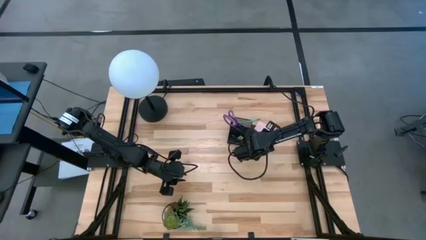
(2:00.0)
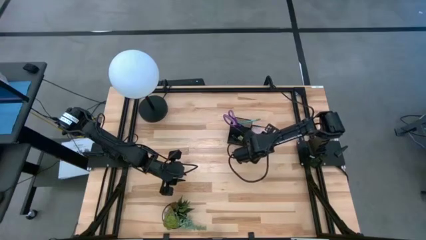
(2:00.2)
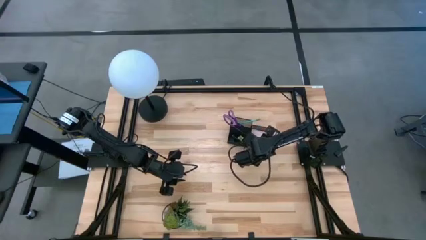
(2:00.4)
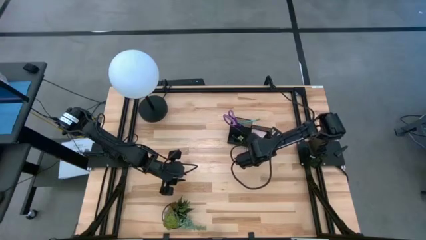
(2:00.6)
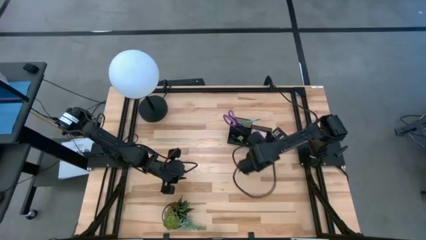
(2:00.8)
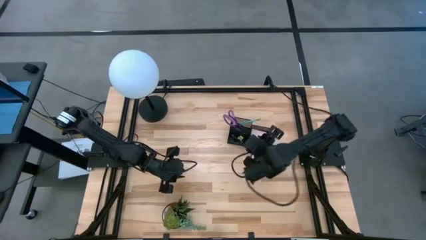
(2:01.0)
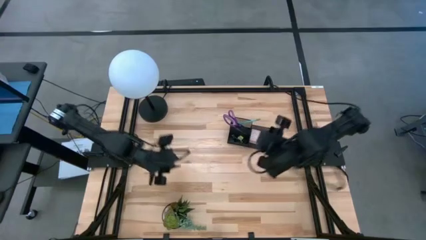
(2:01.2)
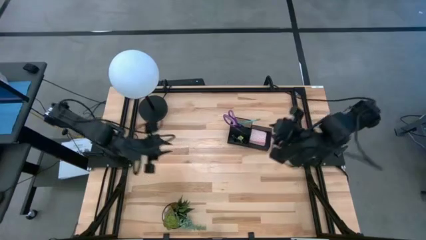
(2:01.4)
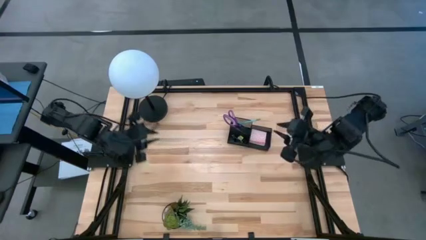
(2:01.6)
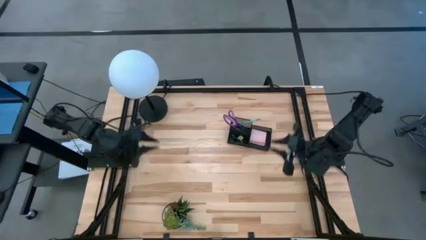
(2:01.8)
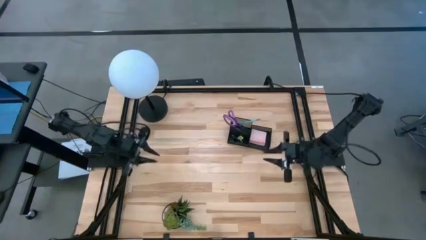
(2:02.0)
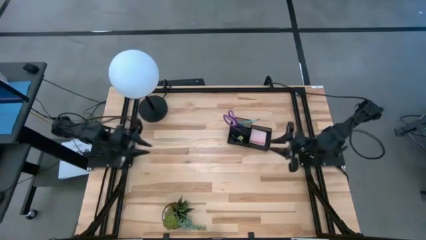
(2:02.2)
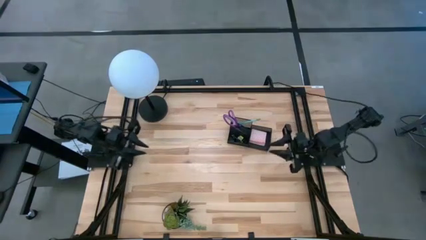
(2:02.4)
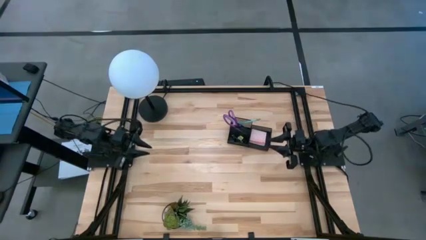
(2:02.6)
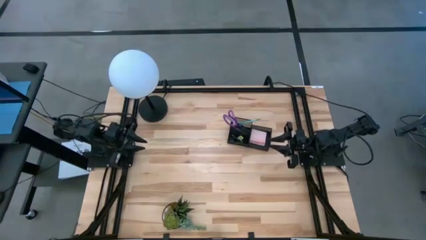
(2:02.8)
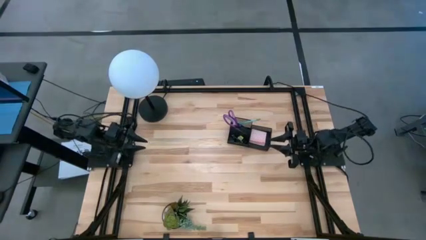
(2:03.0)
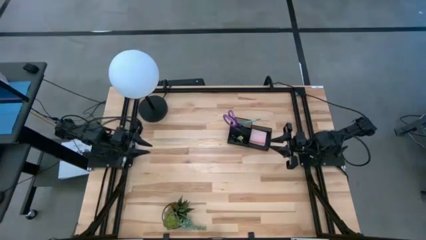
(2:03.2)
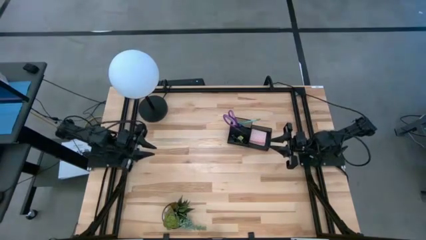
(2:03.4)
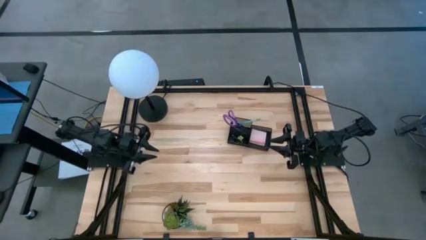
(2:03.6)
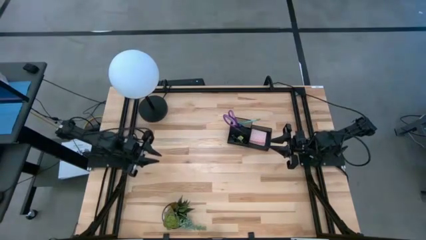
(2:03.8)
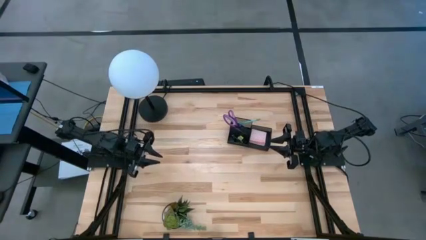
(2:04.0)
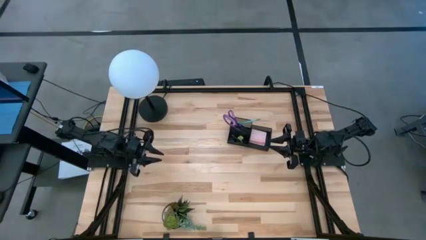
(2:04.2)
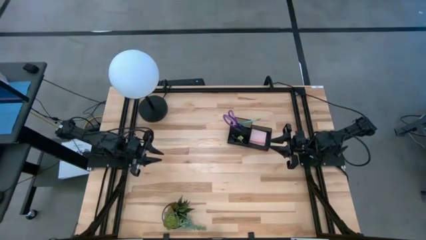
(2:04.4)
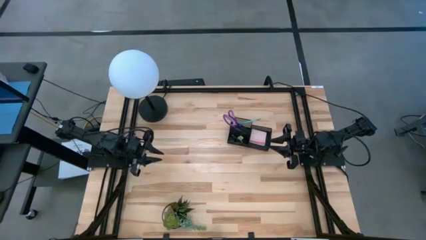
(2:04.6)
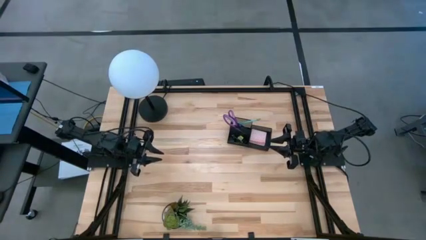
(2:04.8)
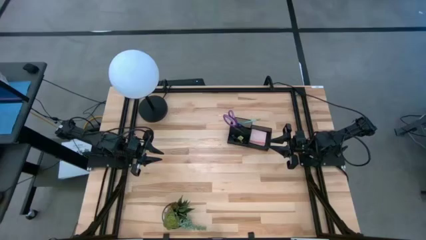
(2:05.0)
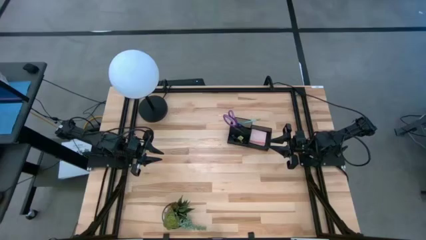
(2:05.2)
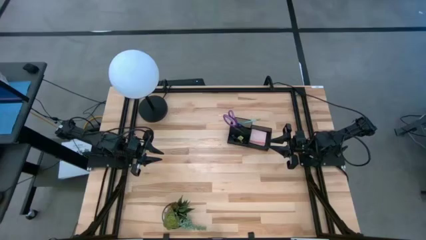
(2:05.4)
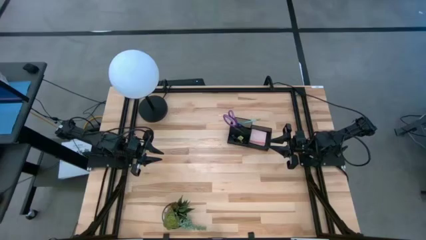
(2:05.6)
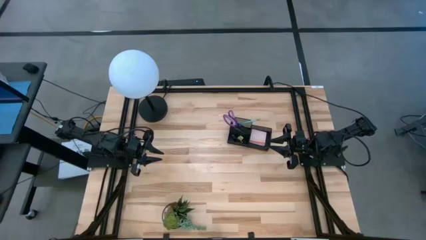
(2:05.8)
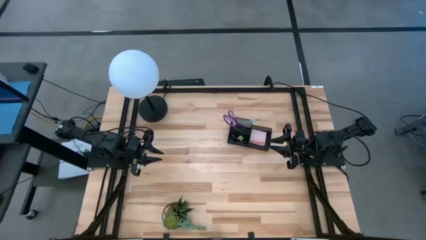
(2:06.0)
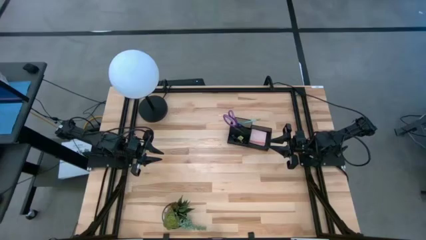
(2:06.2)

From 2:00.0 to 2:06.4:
Task: Pick and place office supplies into organizer
Return to Home Position

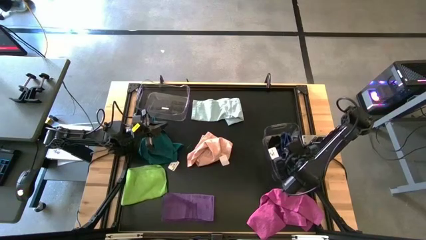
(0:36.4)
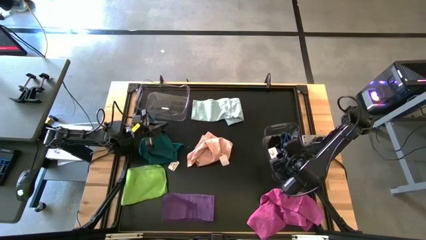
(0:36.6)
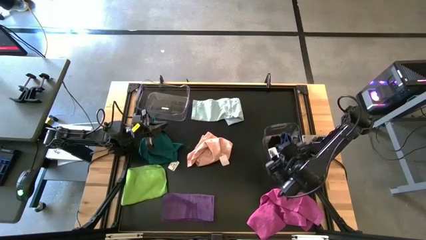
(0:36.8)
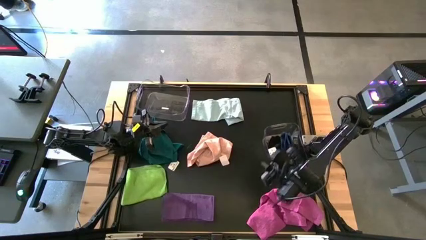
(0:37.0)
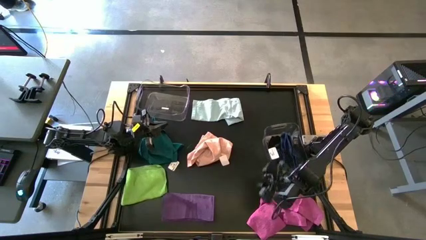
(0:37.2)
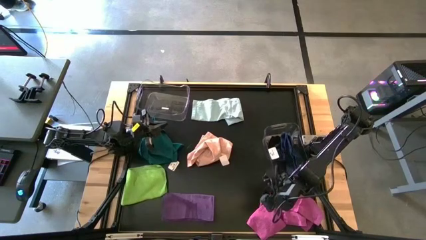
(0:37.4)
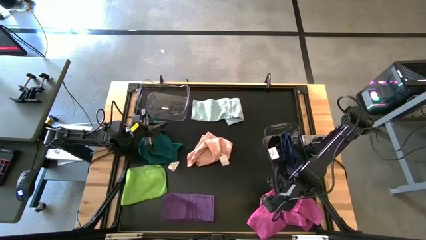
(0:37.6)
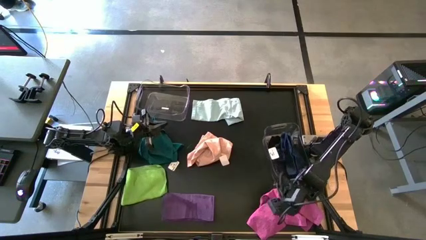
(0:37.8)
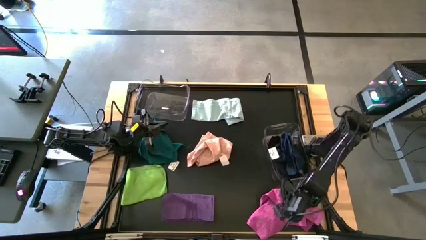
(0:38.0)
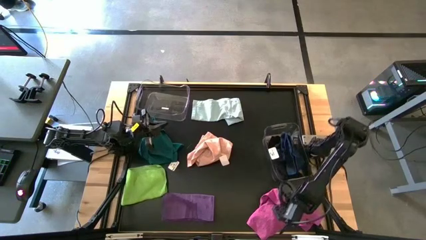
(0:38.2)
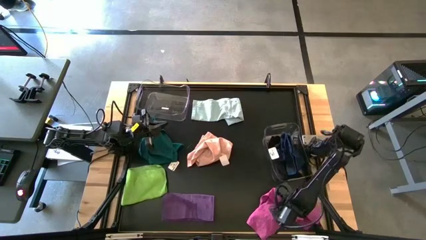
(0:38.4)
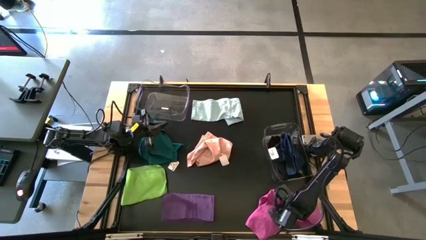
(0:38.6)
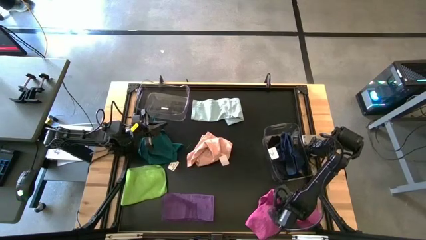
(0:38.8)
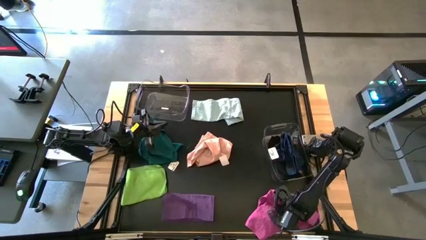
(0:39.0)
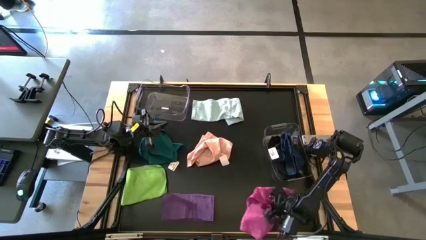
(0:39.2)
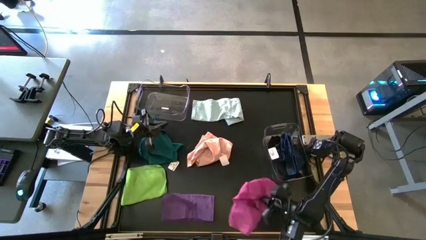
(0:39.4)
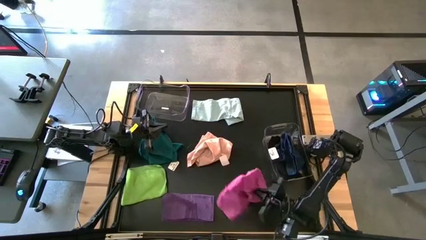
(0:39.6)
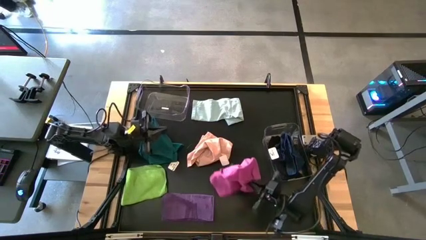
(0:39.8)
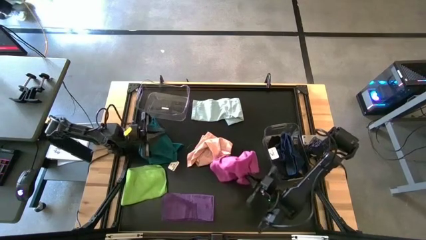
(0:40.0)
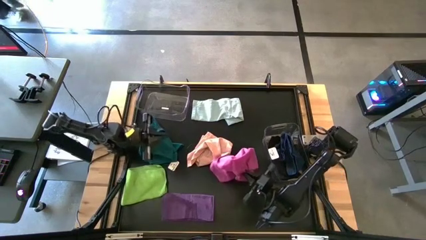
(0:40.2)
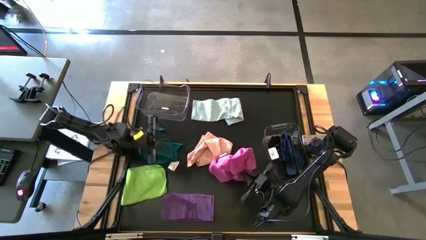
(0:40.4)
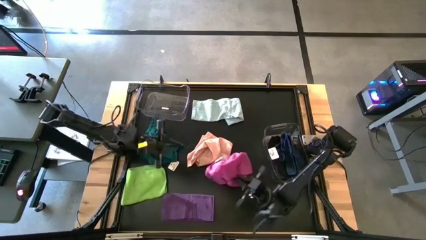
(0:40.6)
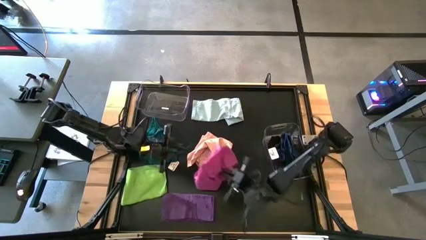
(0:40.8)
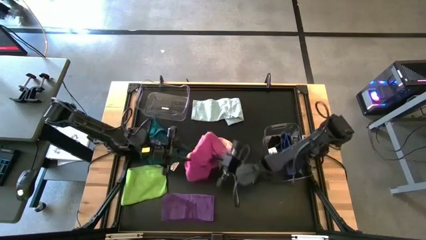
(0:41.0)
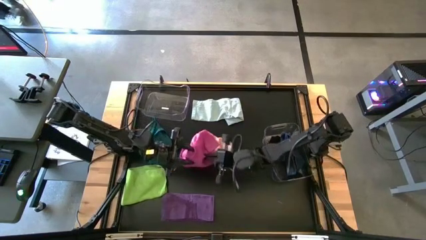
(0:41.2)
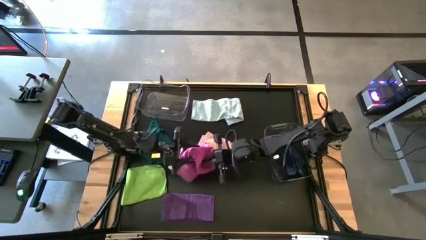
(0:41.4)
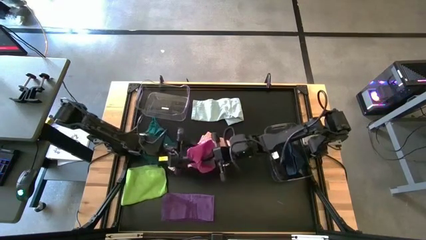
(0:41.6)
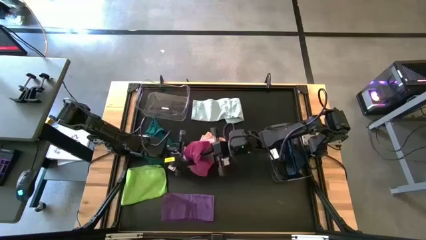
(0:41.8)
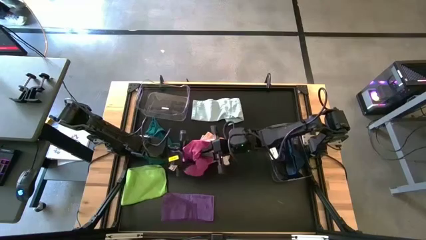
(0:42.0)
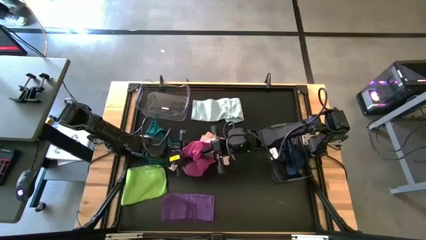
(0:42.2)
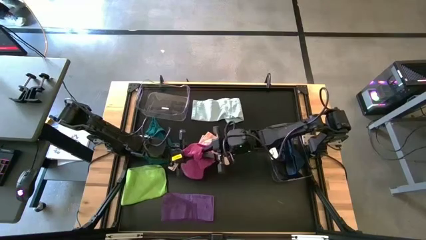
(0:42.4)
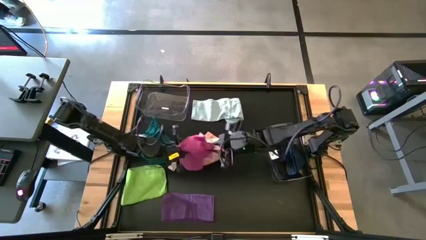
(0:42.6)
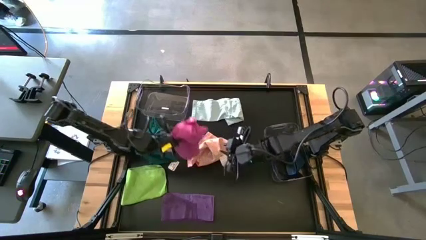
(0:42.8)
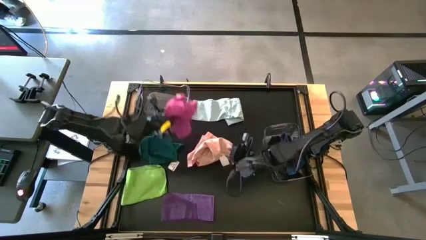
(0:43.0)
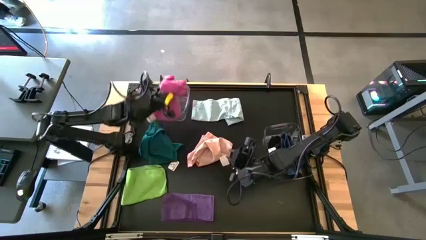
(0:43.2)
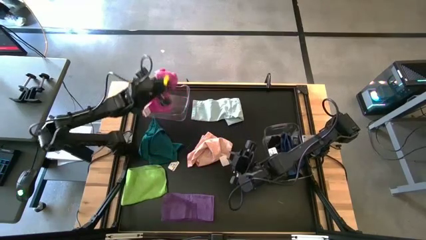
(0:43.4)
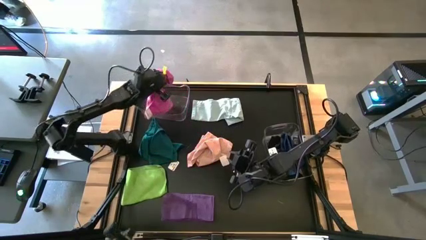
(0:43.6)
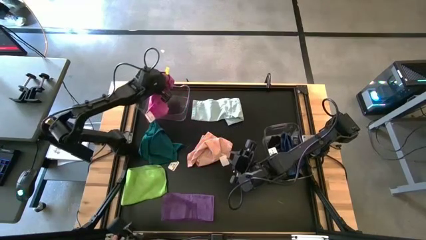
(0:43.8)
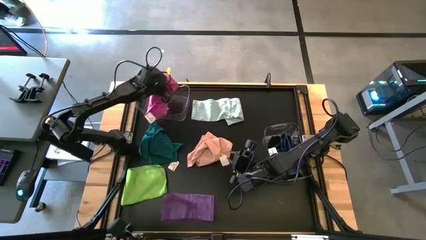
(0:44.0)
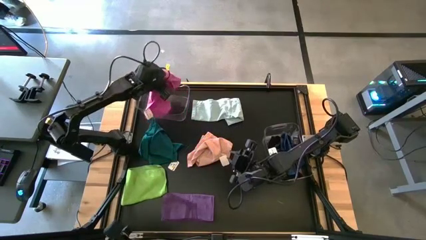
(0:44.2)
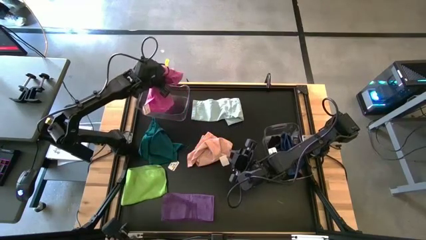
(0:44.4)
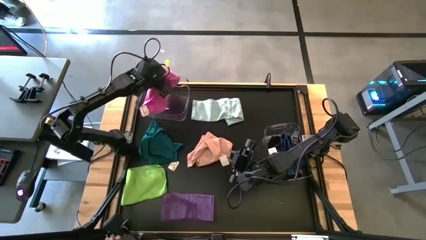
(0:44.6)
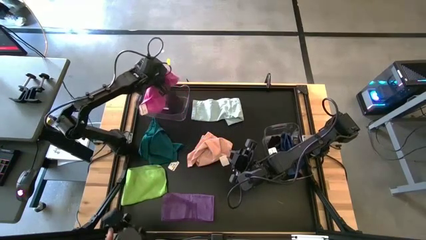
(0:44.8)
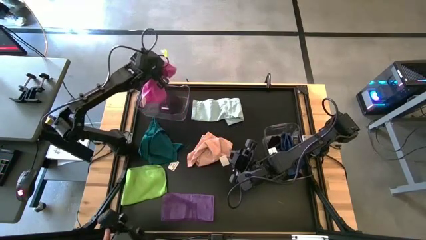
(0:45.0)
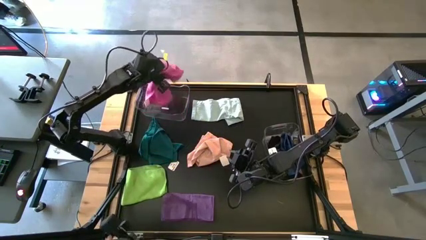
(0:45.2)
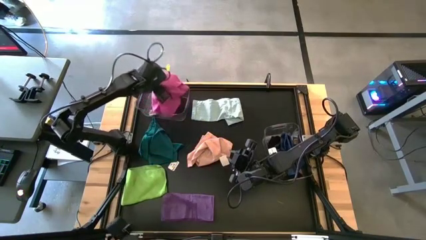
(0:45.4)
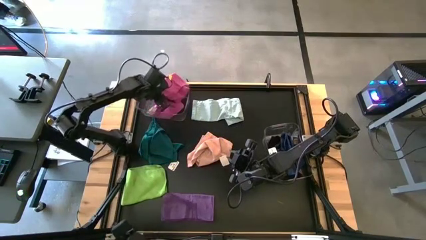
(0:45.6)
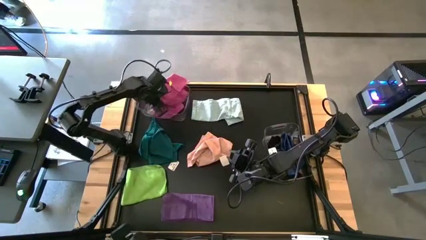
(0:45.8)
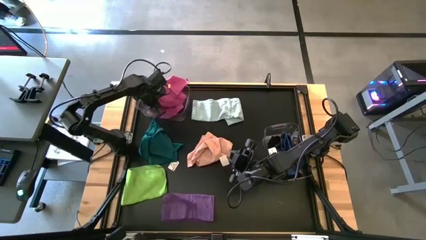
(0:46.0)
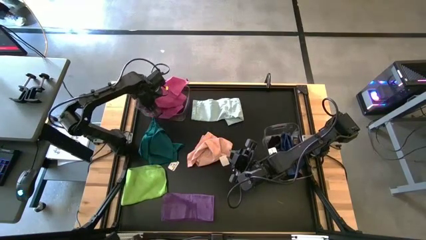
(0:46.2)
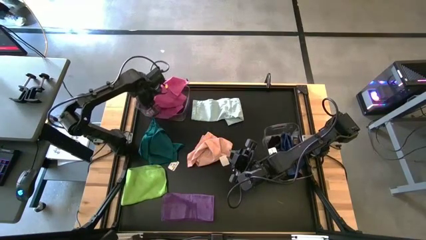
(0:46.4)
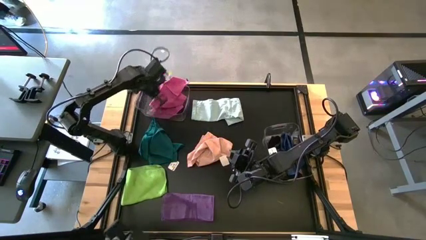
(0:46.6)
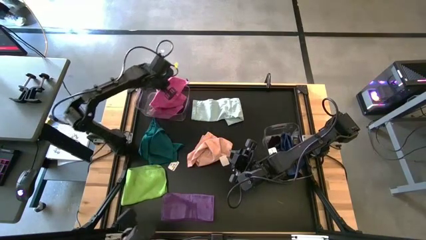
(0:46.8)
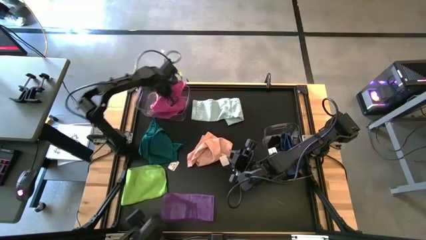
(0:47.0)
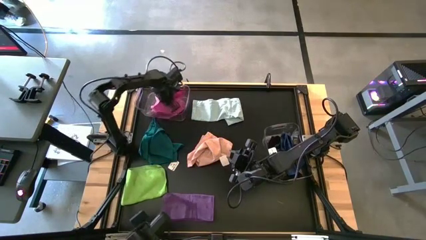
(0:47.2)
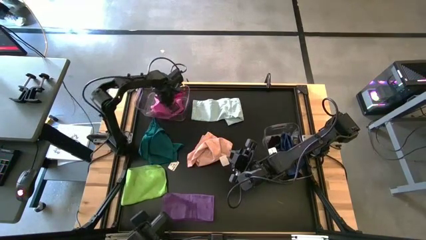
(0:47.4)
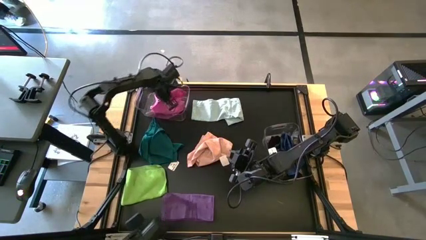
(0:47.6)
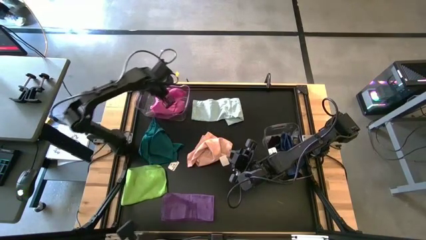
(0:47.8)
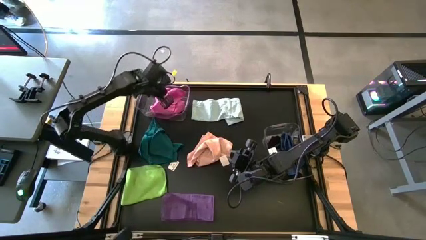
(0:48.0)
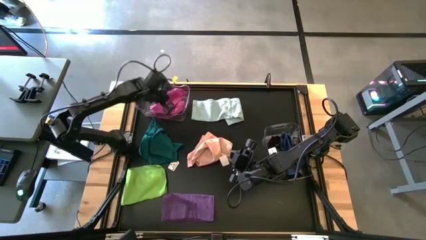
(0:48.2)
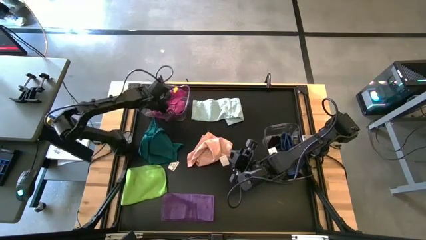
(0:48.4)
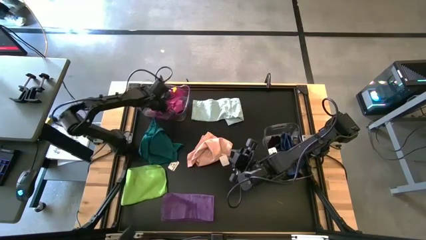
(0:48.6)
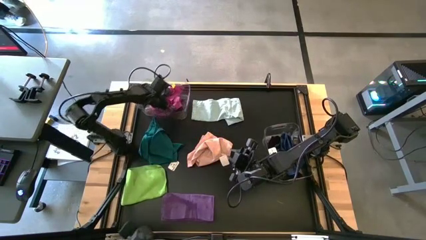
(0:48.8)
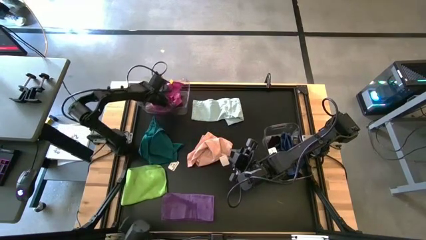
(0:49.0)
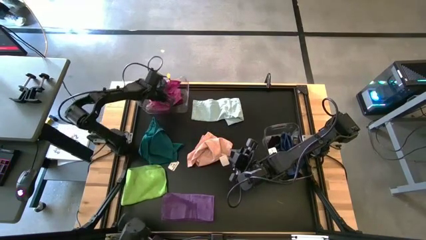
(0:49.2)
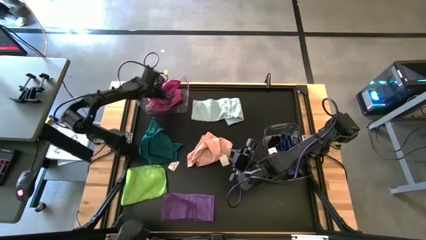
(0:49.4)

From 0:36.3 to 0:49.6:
Task: Sort towels by color in basket
Put the pink towel into the top transparent bin
